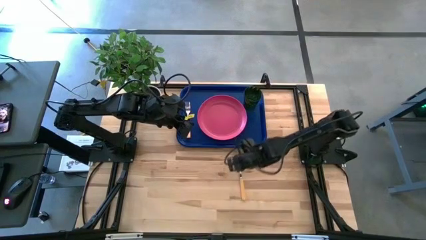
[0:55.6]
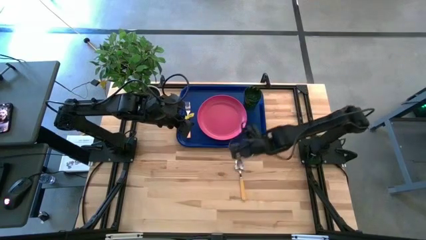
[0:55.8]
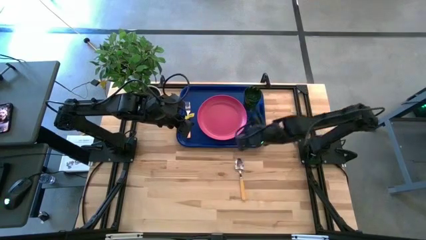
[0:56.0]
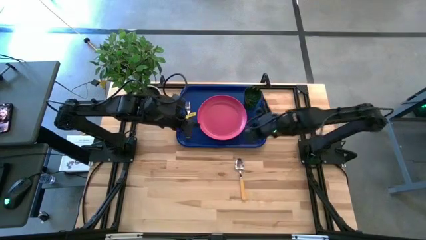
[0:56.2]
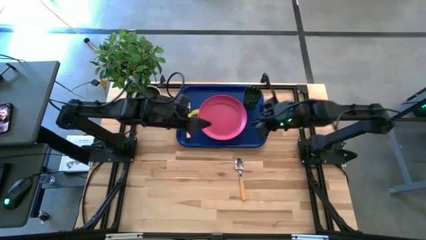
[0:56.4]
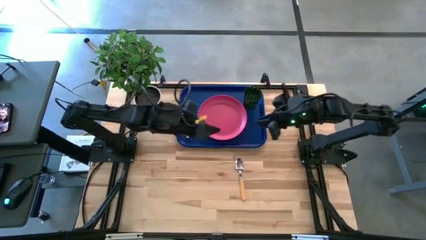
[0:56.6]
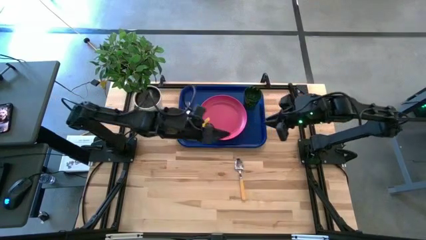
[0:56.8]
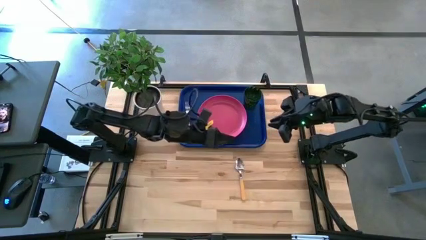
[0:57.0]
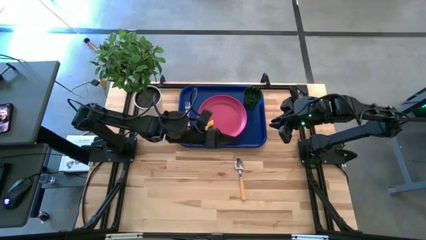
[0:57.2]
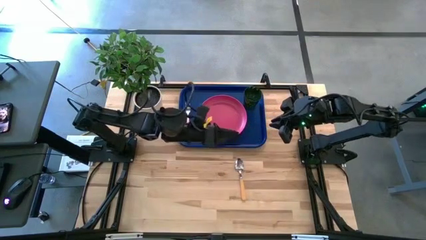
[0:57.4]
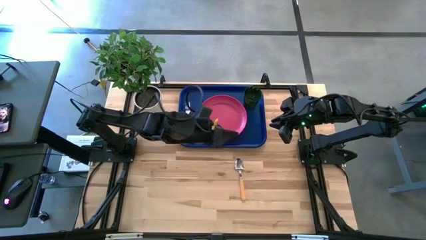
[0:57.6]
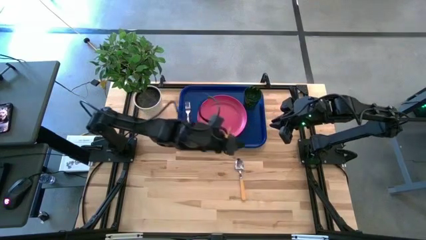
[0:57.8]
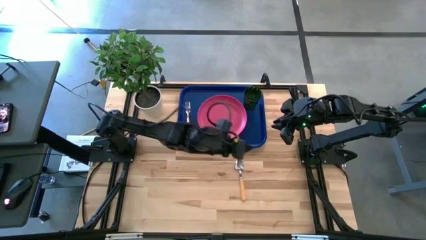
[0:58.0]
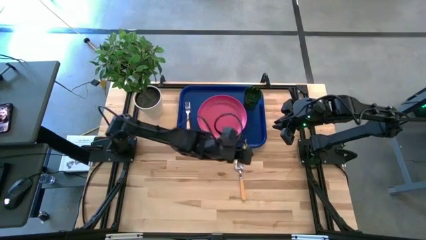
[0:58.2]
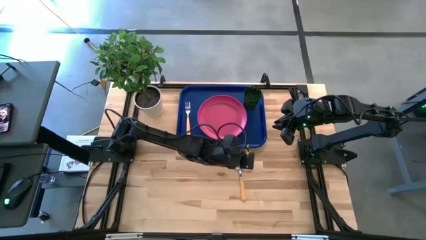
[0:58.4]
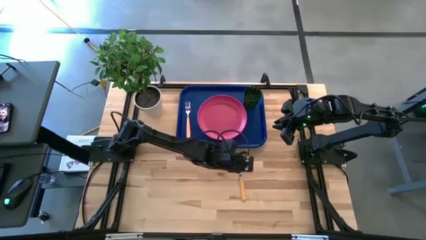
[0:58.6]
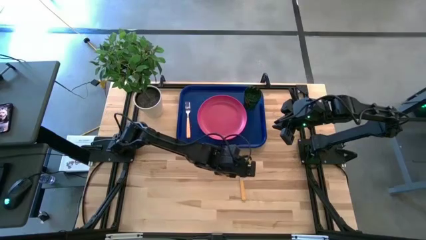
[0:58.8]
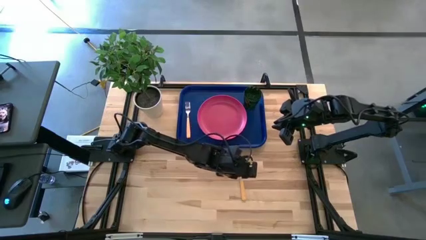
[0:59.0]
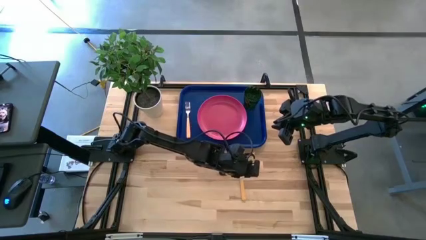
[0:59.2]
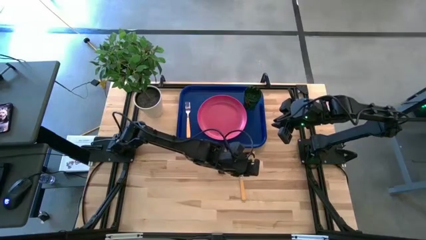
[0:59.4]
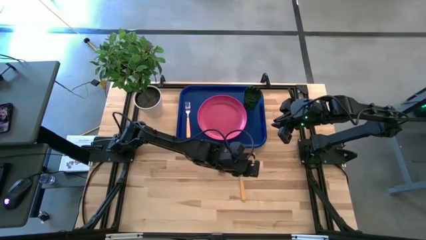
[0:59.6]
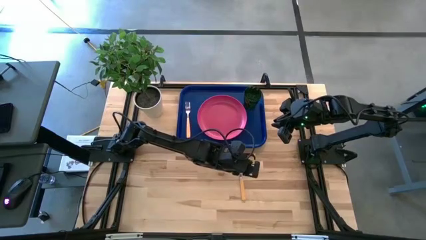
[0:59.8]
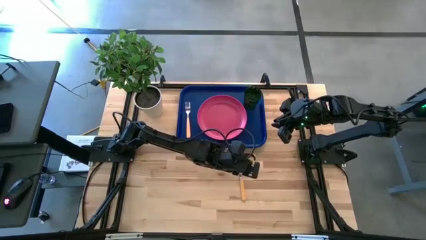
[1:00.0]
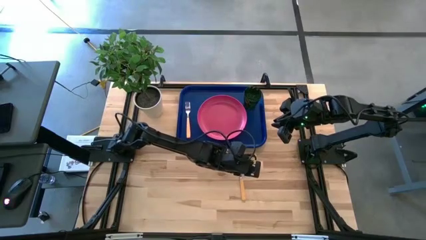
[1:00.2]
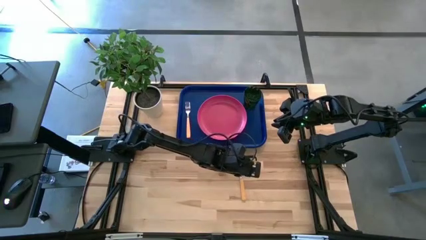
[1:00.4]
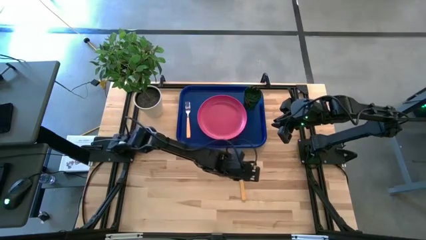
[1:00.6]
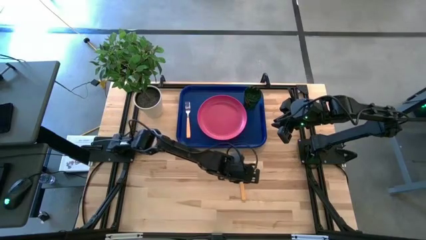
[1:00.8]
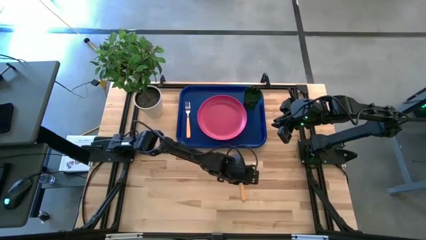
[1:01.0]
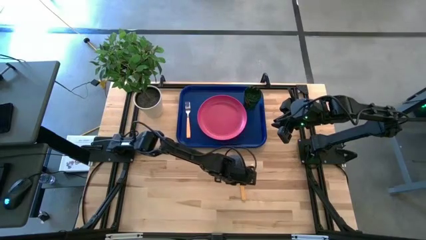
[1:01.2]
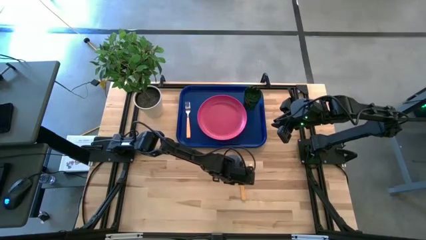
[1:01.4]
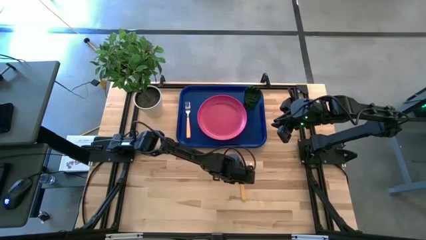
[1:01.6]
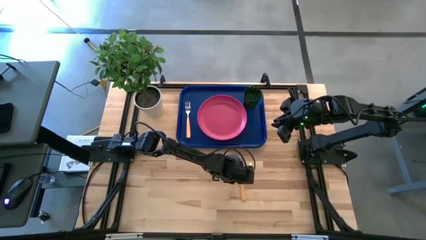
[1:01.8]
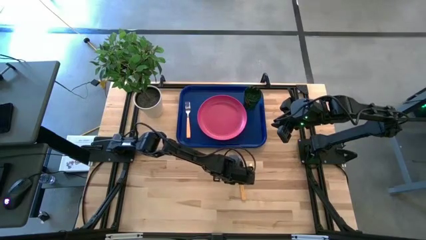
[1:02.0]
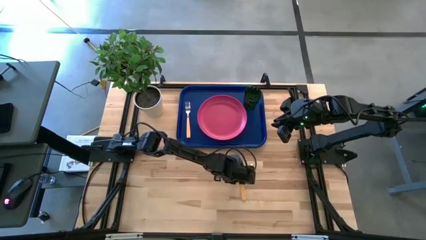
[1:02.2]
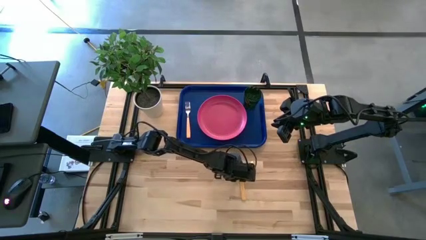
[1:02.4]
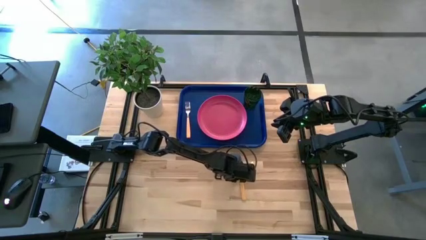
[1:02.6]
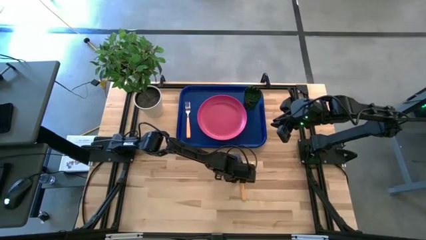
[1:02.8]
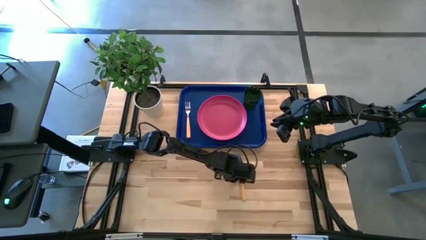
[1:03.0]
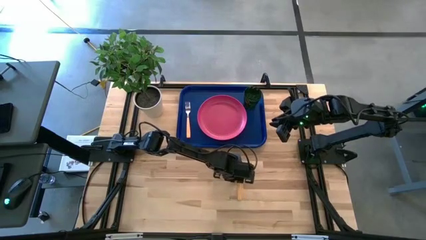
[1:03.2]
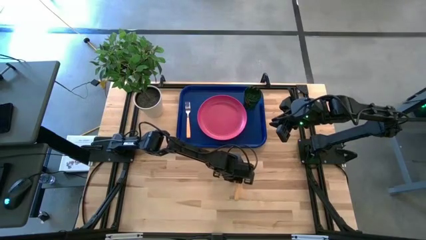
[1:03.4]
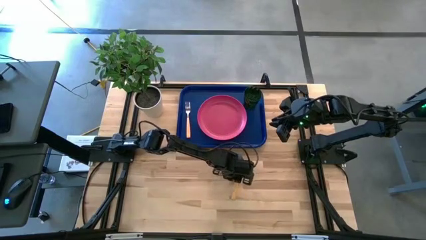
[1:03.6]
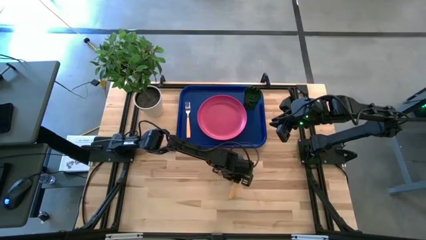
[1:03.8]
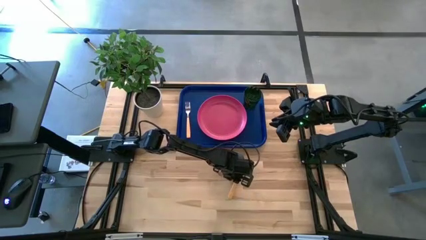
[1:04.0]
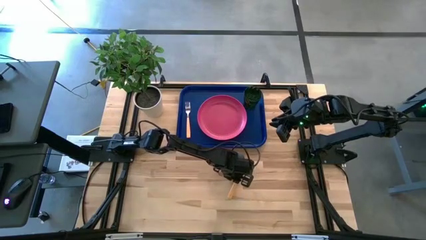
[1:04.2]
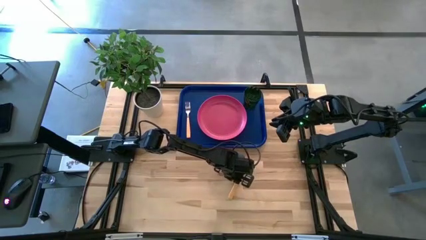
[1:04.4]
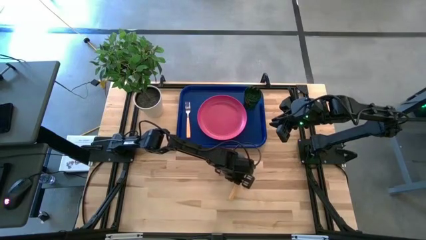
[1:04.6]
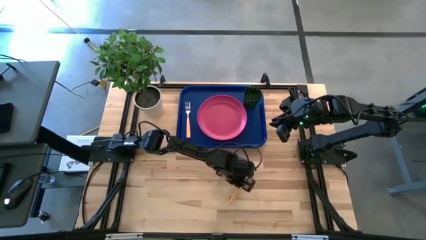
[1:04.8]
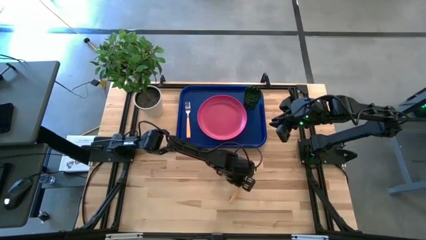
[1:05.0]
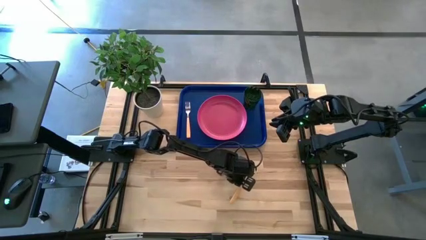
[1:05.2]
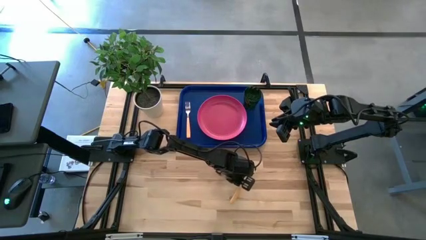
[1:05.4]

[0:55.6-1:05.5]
Task: Pick and place plate/cup/fork/spoon on tray
Put the yellow spoon on the blue serving tray

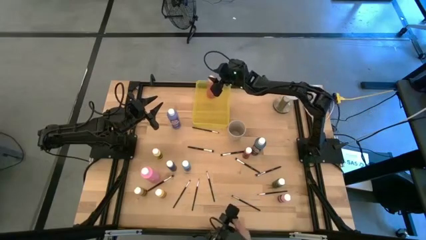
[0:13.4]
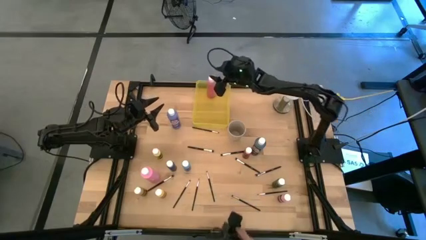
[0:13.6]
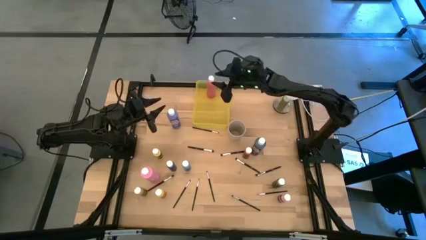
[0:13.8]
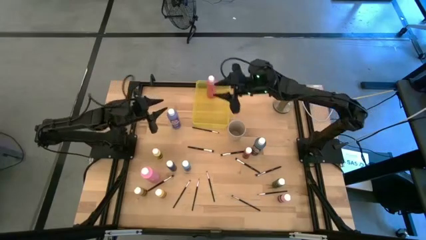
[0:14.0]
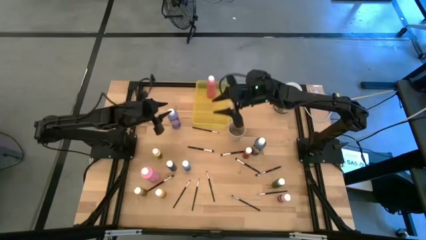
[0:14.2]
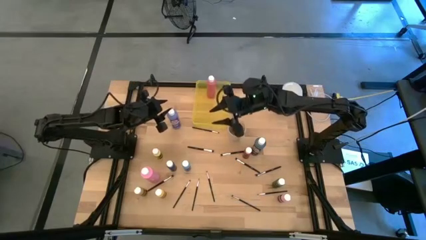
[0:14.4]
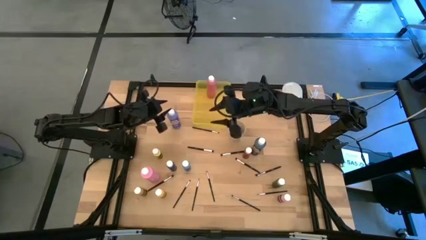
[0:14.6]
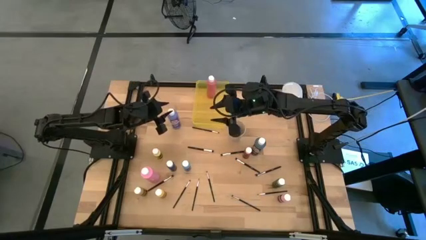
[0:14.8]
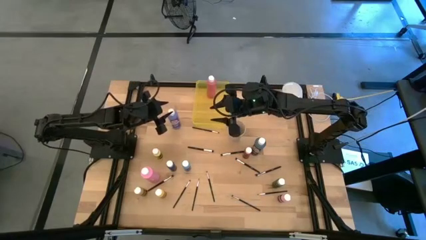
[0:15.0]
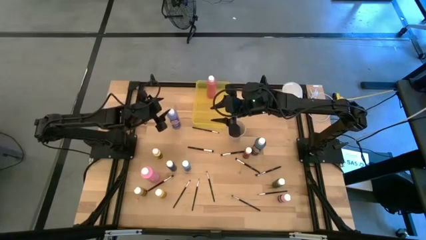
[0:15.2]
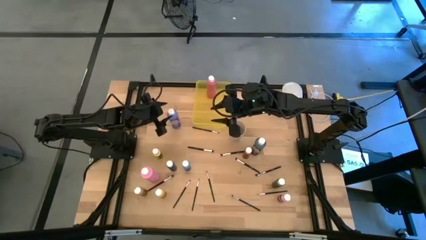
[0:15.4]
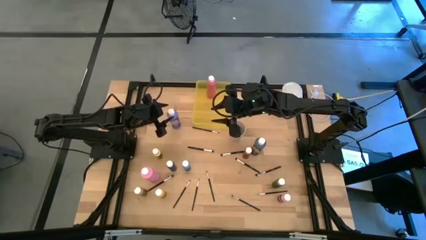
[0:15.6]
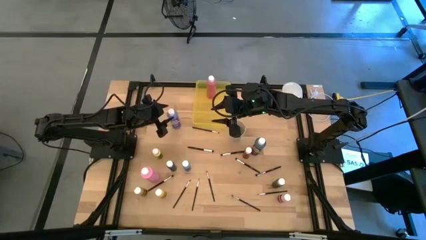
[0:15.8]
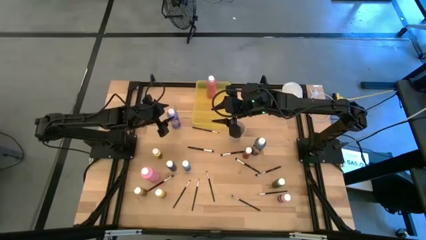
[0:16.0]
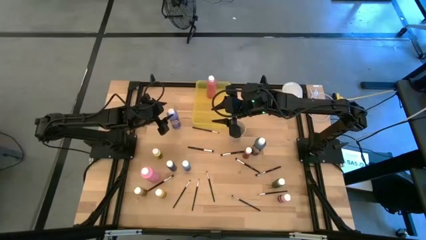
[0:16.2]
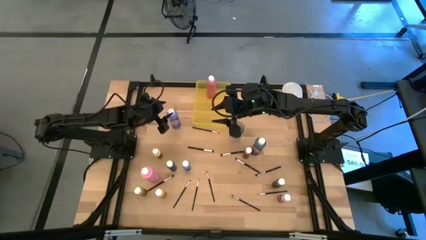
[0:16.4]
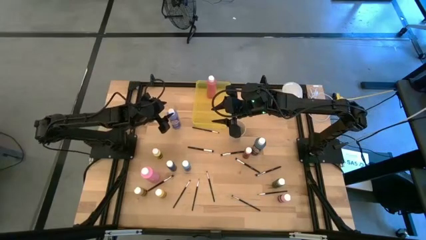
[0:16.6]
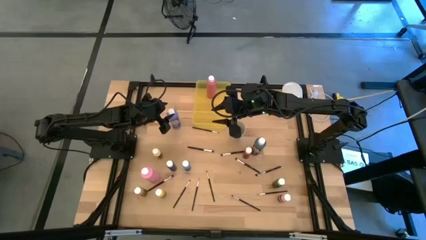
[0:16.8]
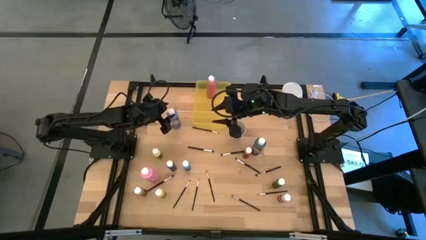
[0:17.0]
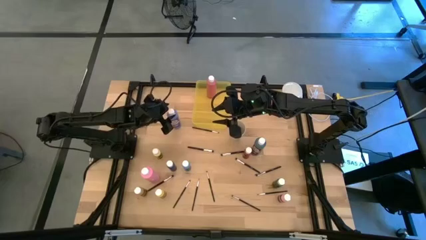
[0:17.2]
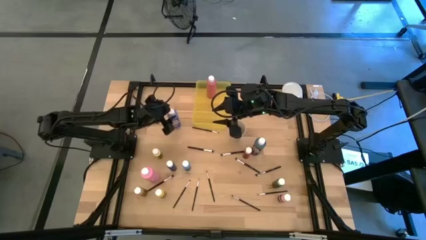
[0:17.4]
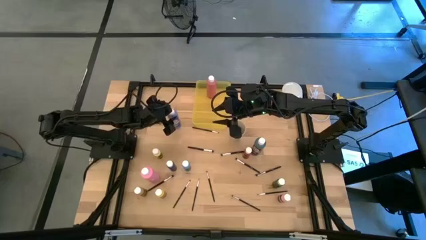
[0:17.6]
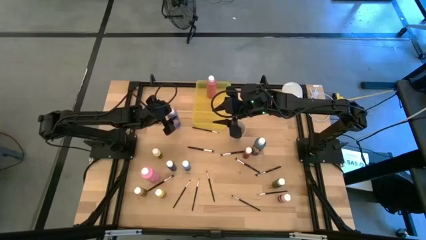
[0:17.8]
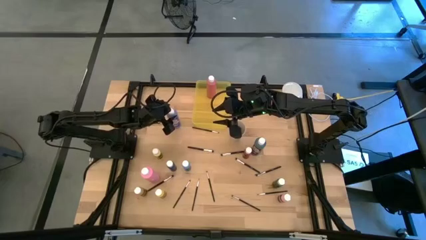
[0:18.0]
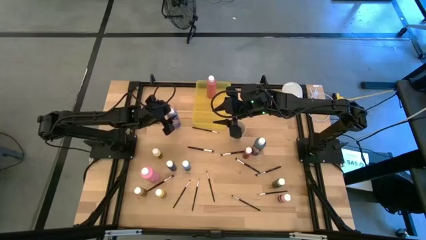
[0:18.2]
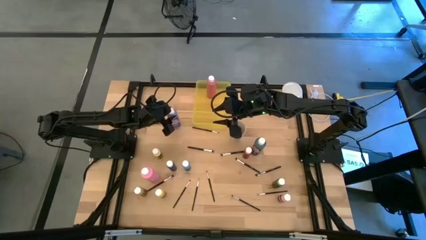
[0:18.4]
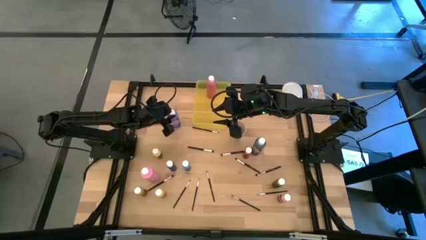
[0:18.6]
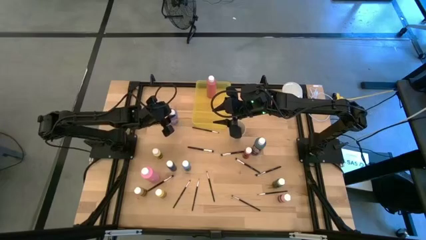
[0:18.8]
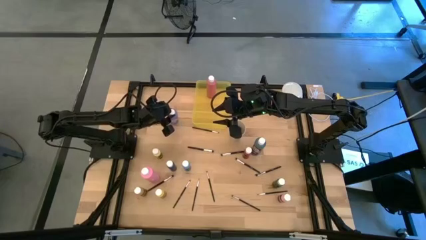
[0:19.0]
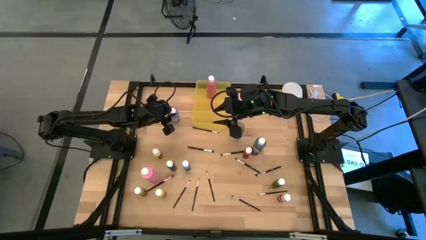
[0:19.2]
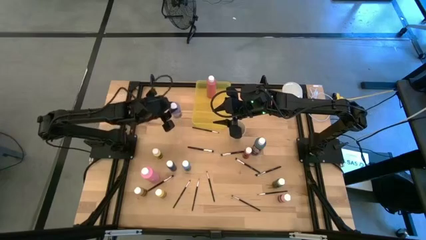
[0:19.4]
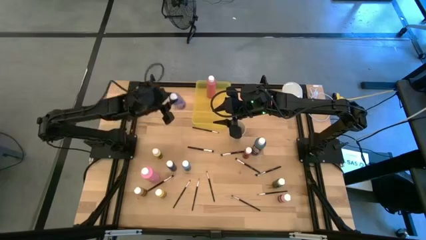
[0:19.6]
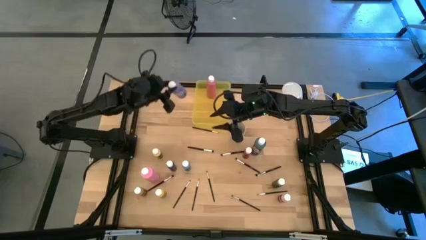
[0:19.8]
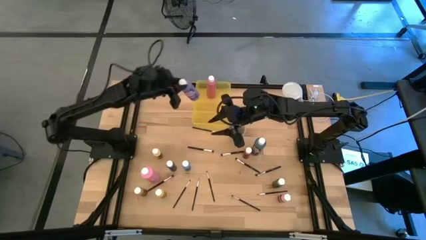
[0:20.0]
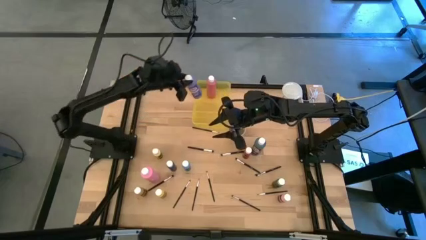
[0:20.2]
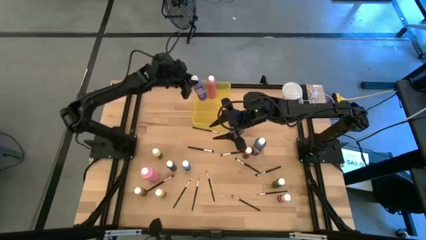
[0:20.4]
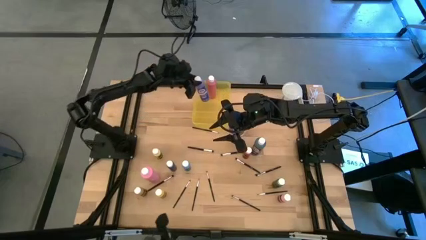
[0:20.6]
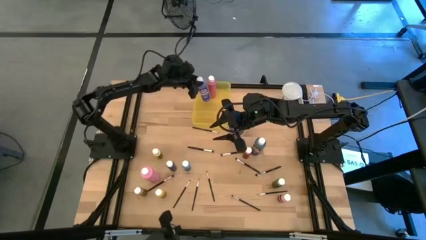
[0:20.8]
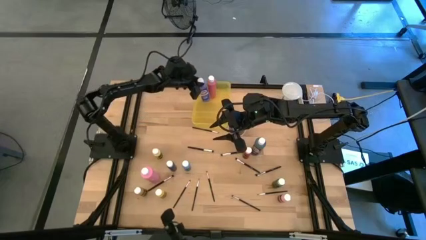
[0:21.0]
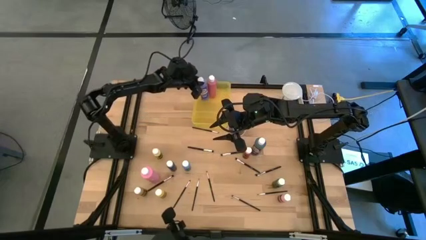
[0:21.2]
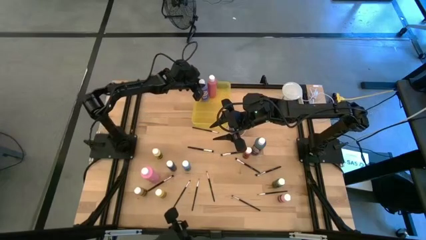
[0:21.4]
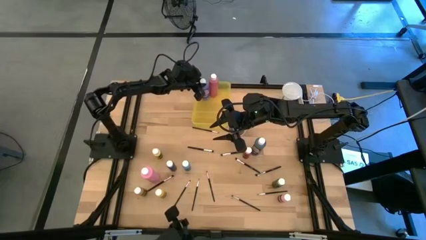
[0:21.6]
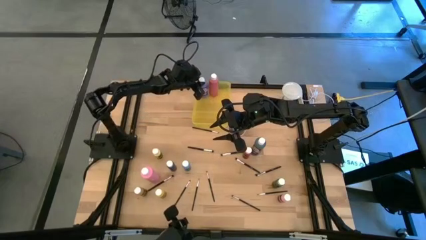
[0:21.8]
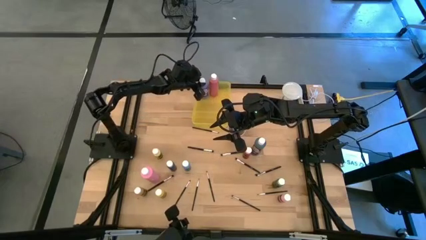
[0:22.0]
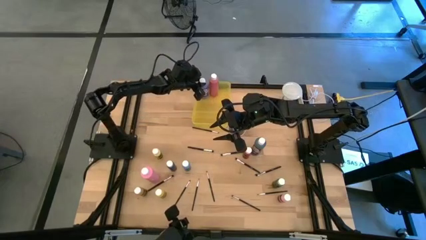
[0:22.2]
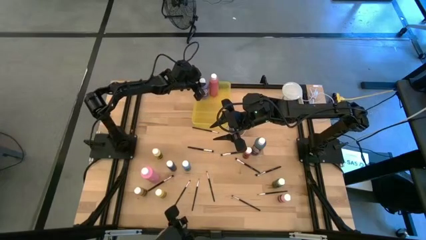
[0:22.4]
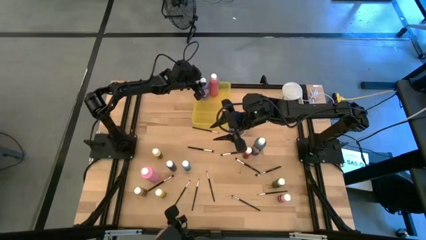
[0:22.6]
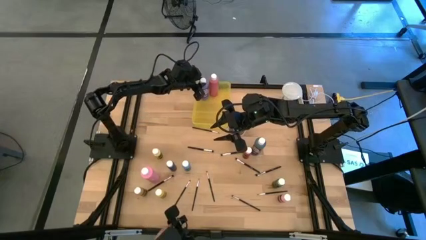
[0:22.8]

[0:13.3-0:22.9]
Task: Pick & Place Paint Supplies
Put the large purple paint bottle into the yellow bin
